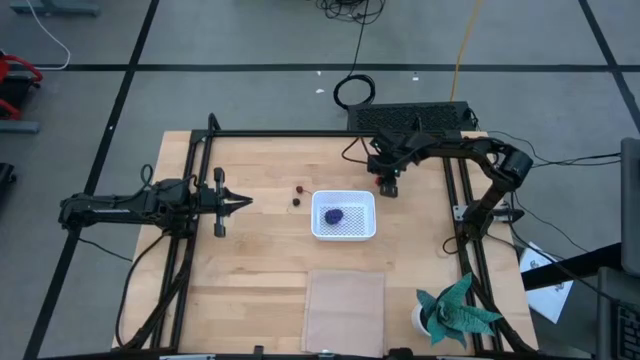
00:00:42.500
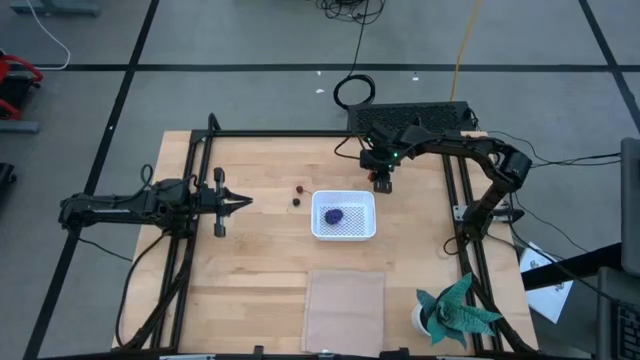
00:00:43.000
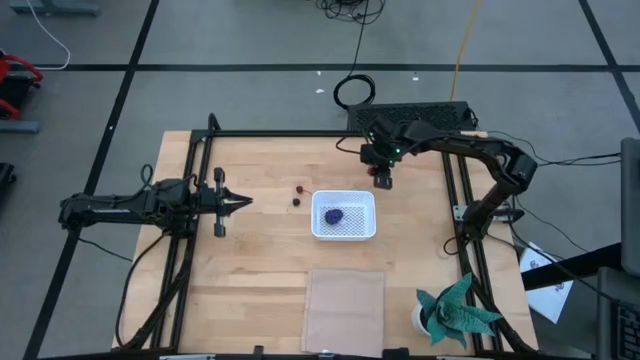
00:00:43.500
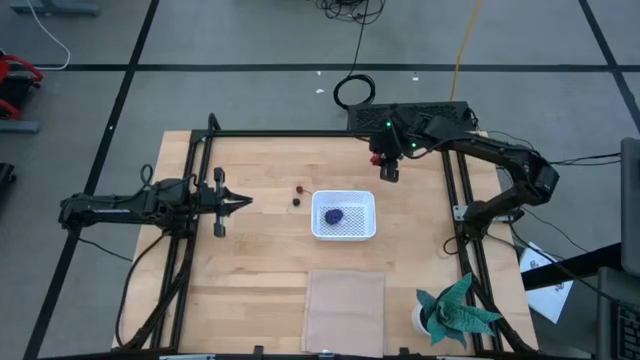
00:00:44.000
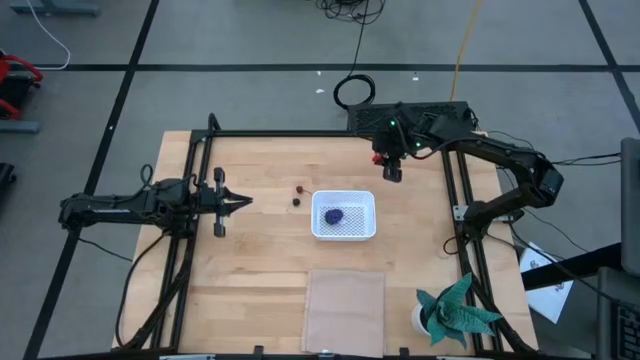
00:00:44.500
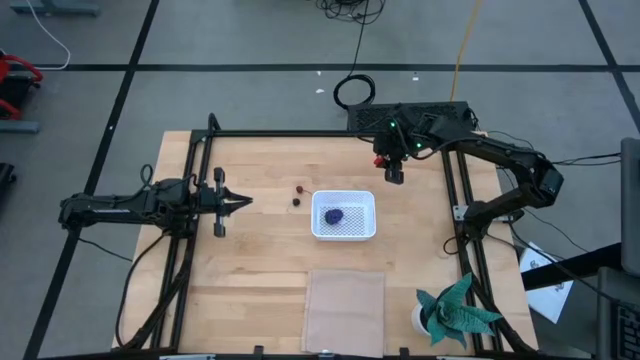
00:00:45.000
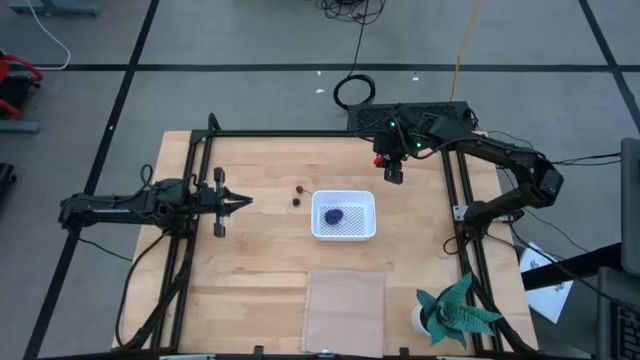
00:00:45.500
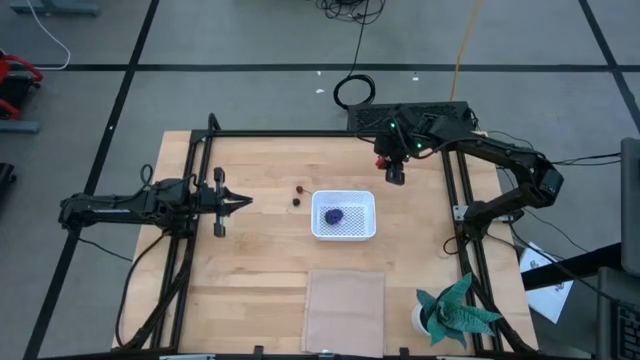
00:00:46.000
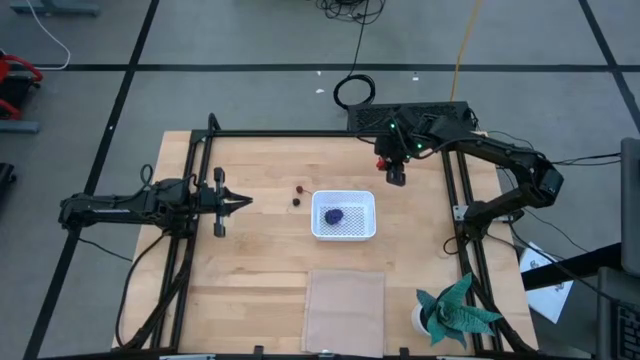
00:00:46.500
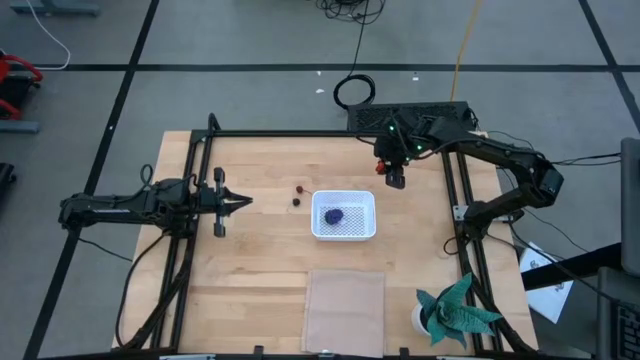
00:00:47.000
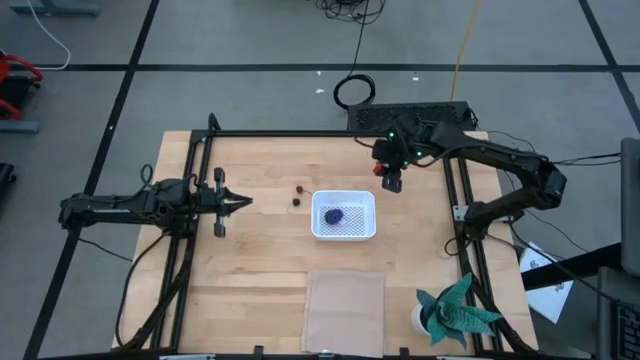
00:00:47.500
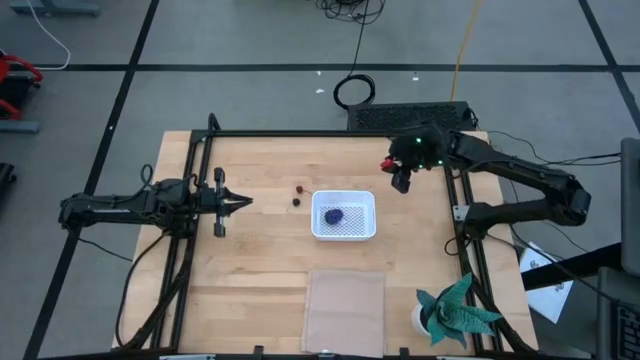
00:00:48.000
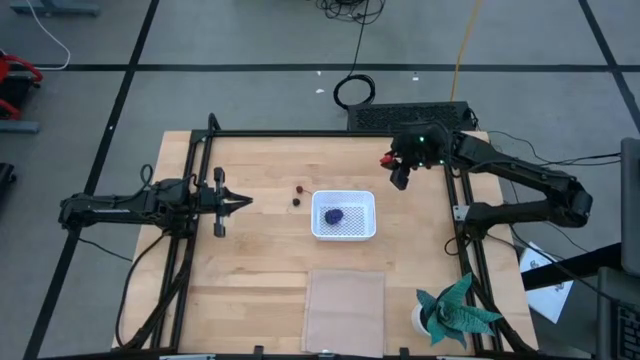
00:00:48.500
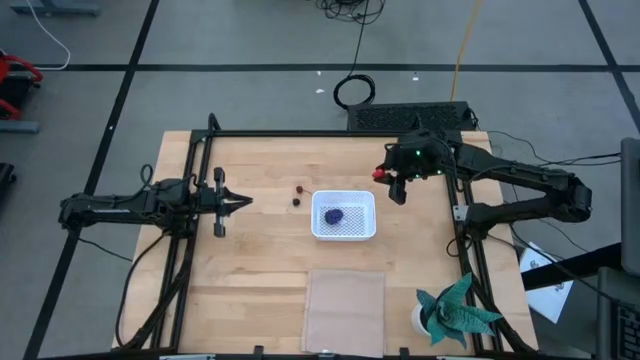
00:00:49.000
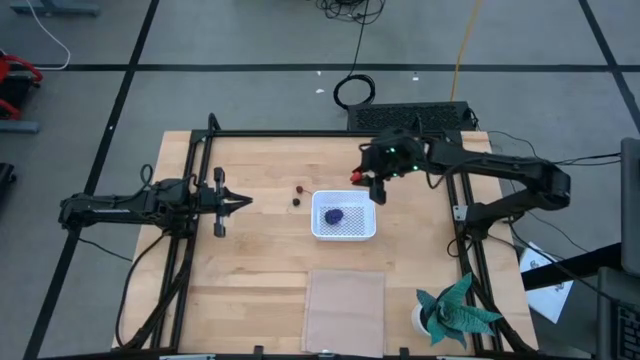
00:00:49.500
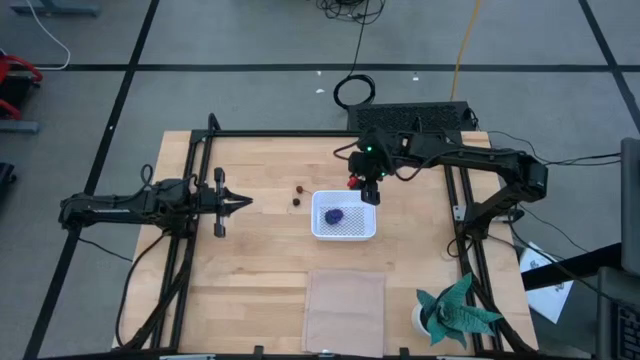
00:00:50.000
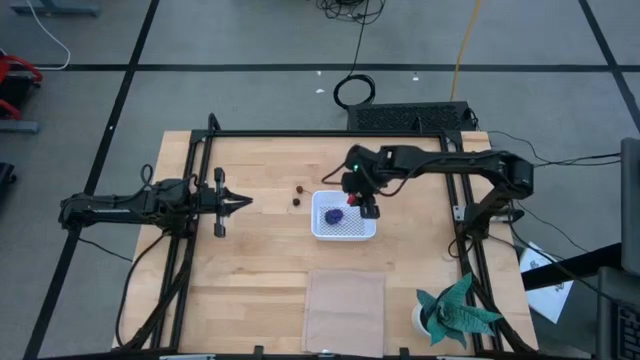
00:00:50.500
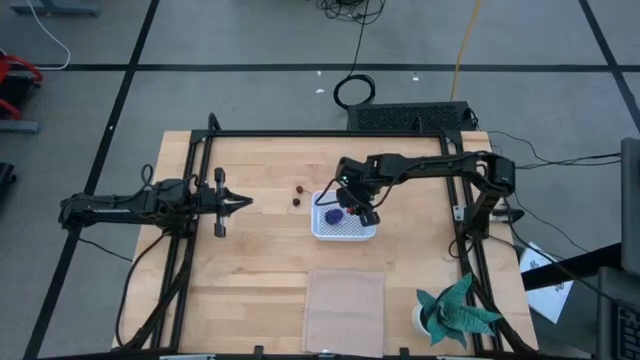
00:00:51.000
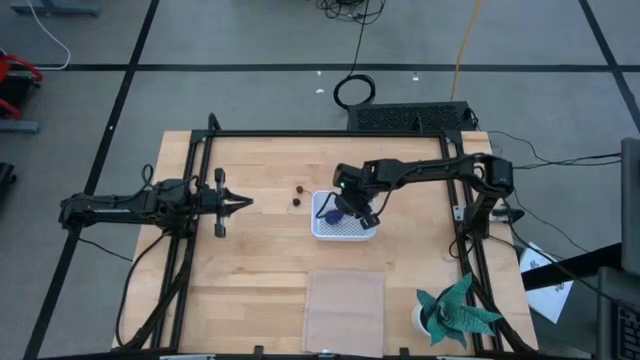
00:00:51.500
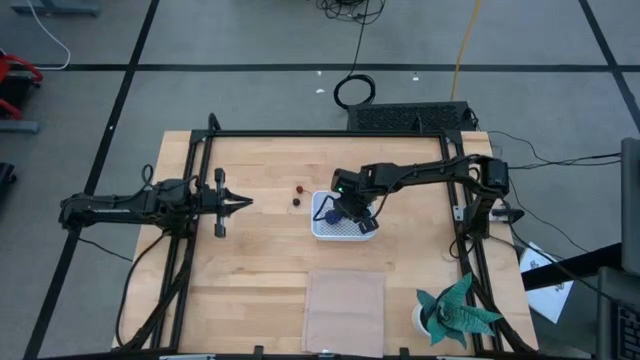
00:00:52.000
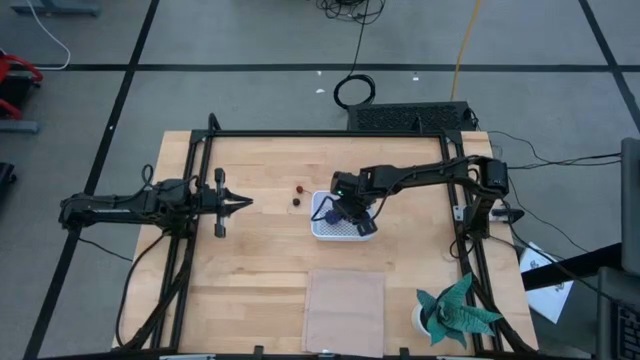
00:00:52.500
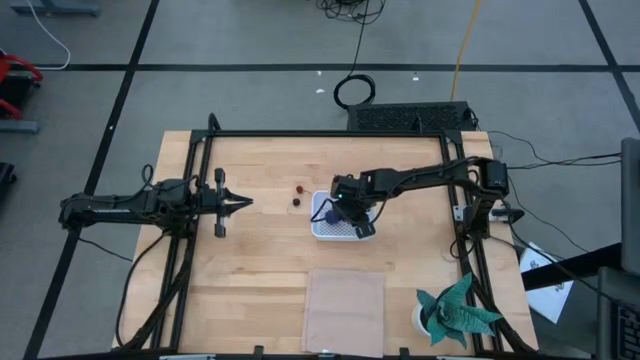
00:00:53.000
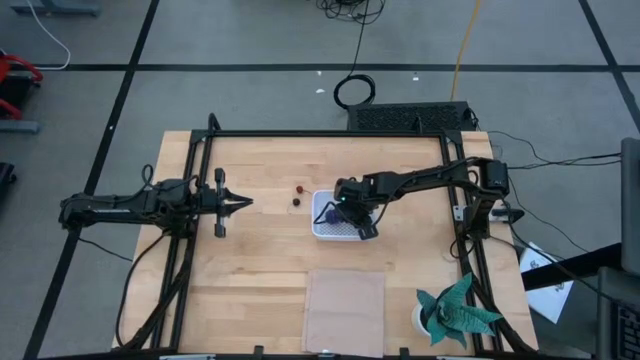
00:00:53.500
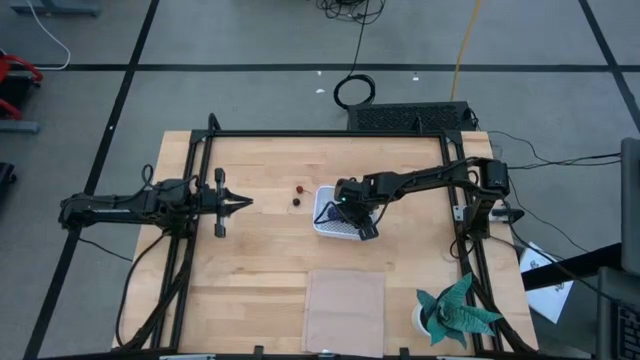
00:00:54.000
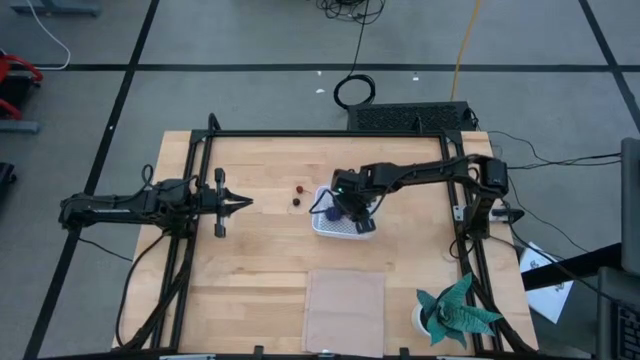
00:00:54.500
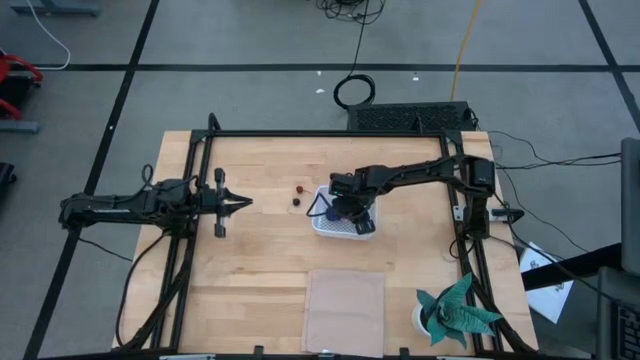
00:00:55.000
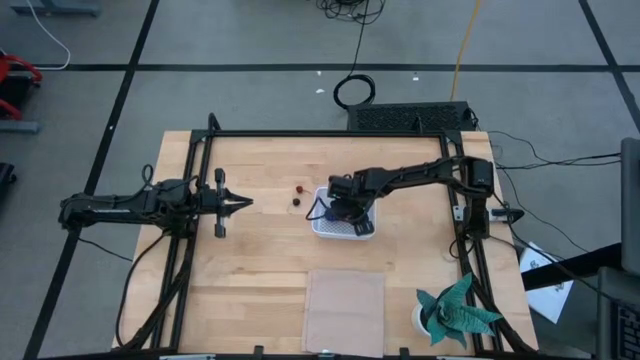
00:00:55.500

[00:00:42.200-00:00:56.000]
Task: Pick and placing Produce into tupperware
Put the red strawberry into the white basket

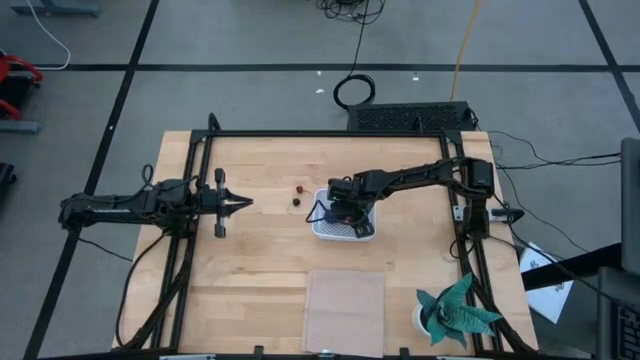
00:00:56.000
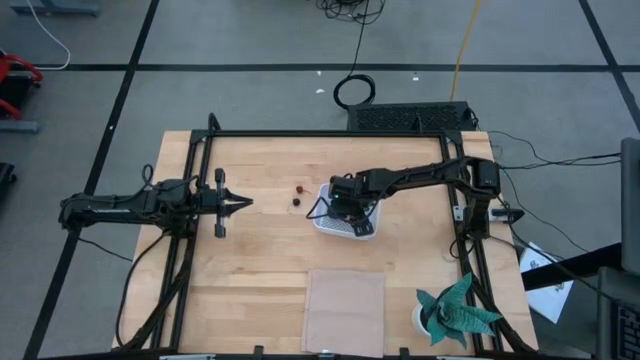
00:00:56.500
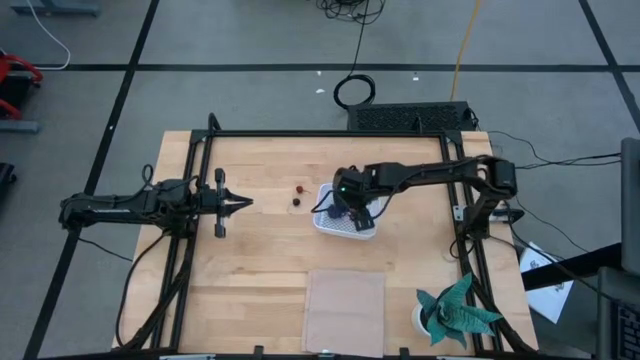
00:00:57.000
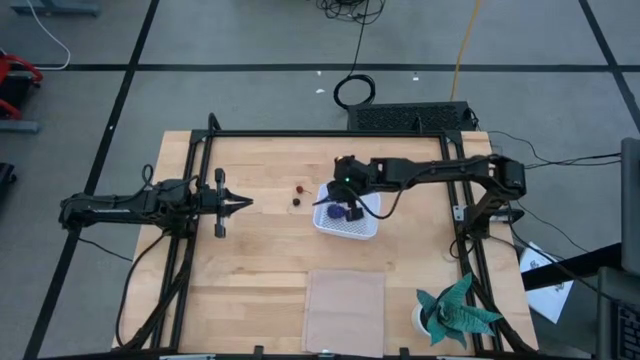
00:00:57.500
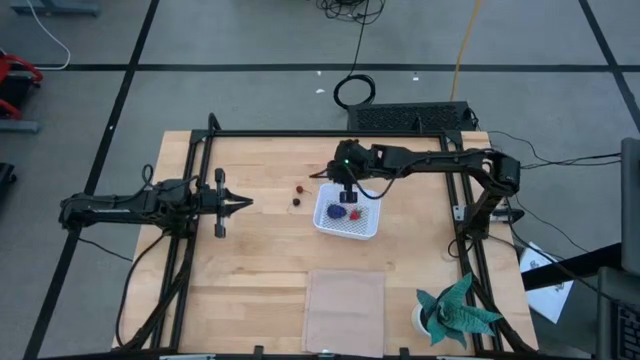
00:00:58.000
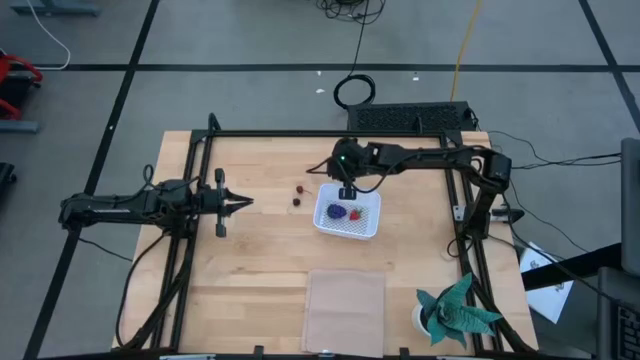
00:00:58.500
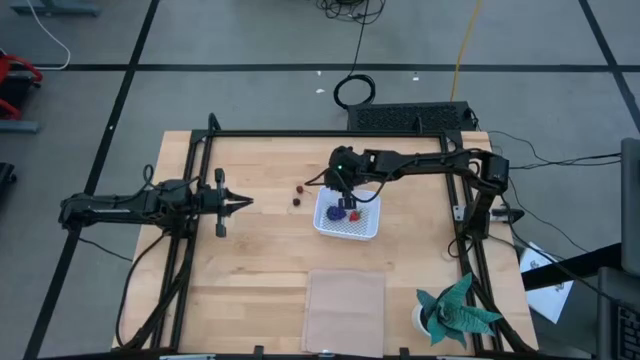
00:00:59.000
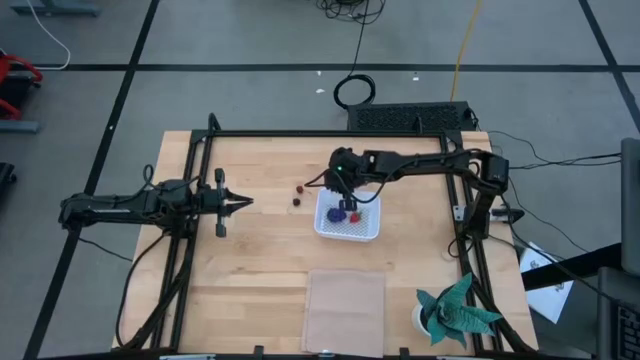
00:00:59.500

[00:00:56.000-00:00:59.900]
Adjust the white basket

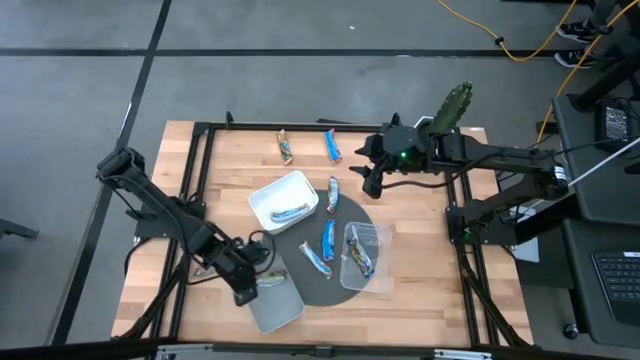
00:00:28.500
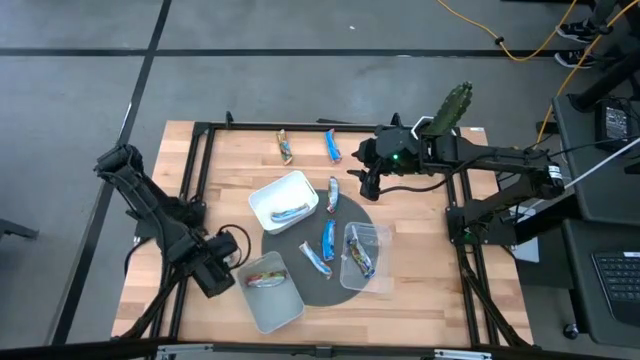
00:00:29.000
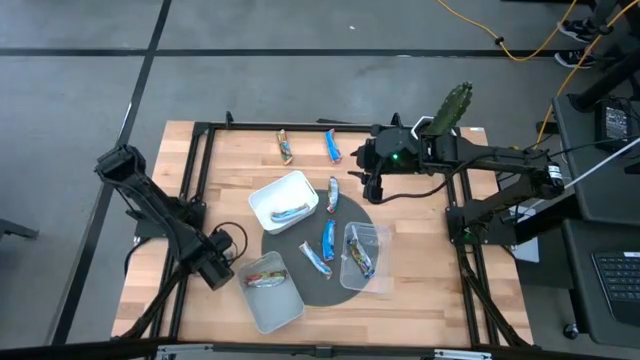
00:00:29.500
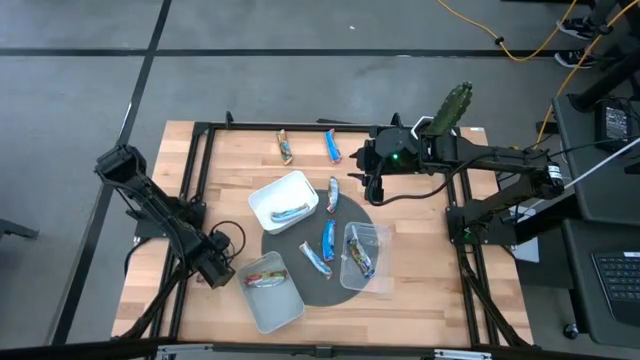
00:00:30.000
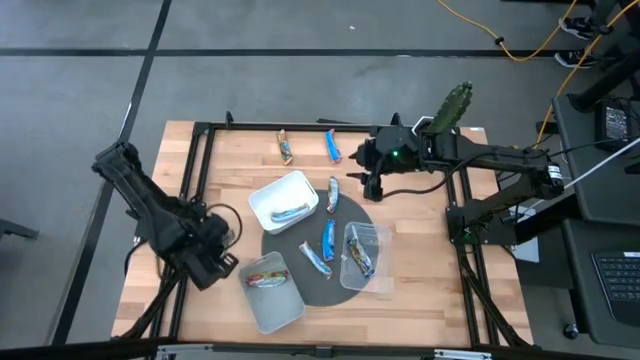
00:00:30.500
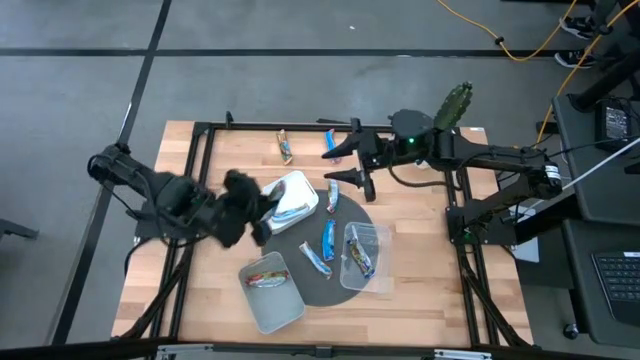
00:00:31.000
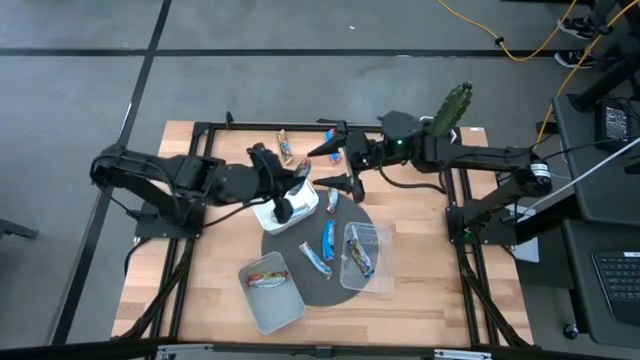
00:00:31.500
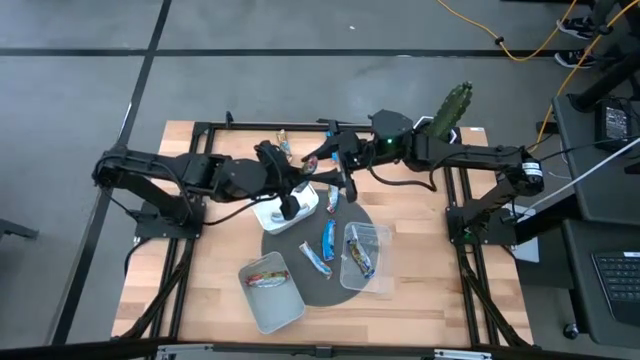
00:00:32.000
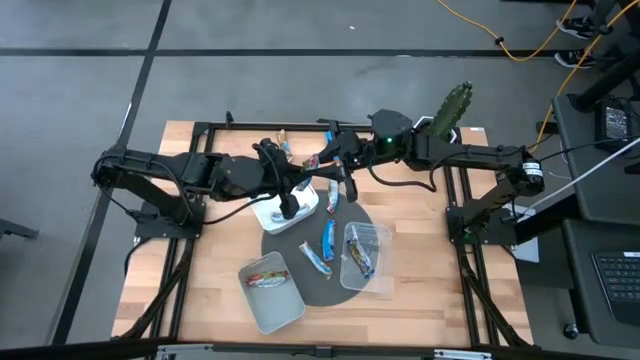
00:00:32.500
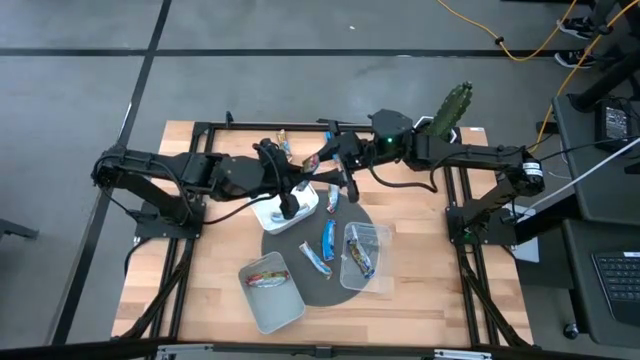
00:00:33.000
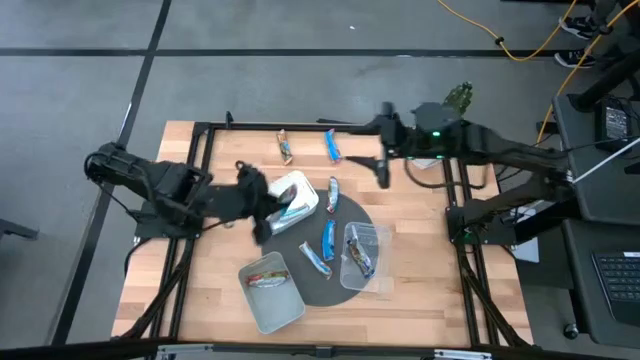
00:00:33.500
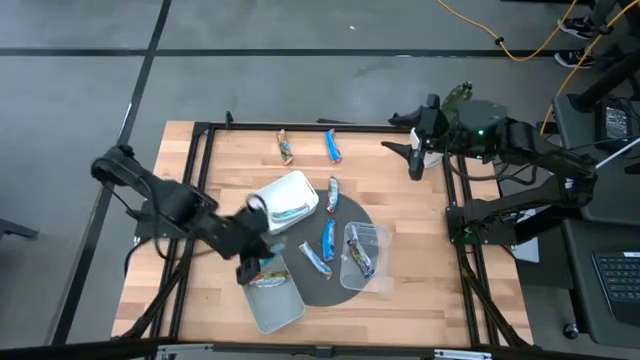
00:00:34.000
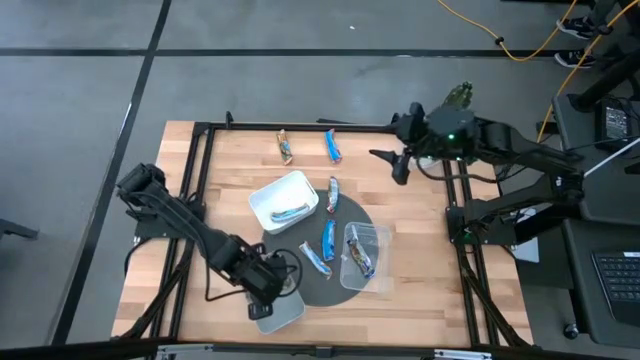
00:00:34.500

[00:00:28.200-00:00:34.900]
Task: Pick and place Granola Bars by type
Put the red granola bar into the gray bin
